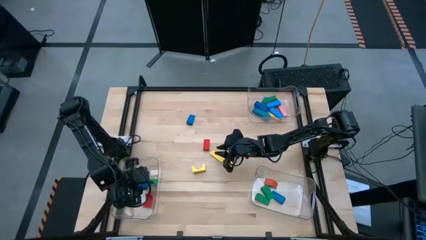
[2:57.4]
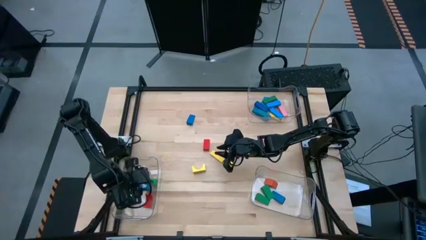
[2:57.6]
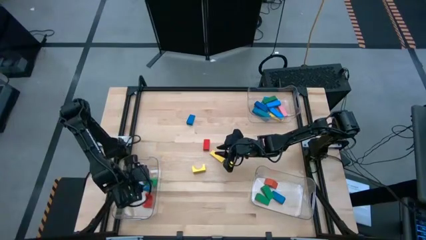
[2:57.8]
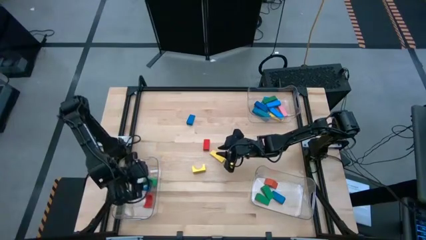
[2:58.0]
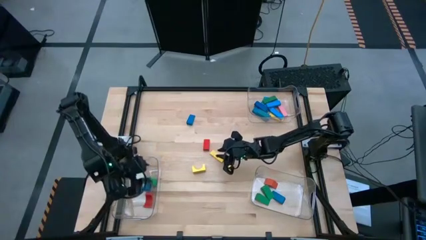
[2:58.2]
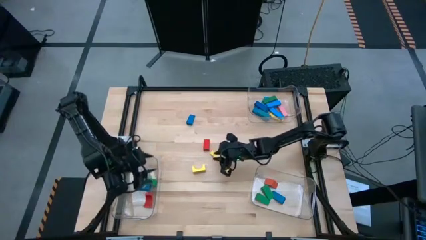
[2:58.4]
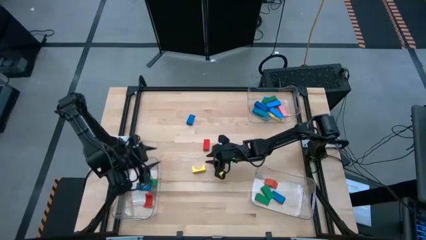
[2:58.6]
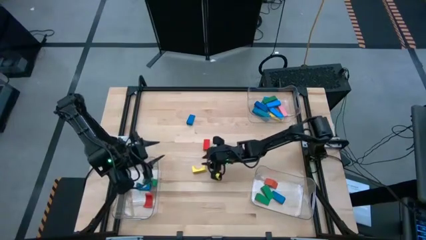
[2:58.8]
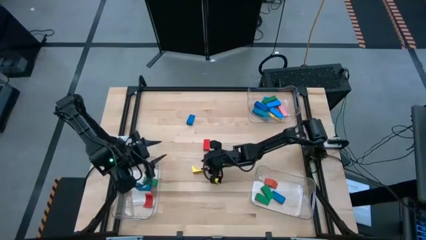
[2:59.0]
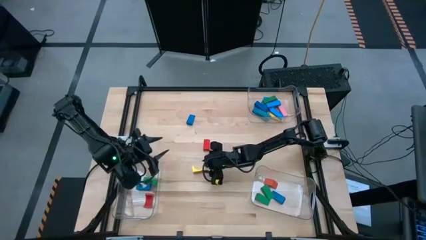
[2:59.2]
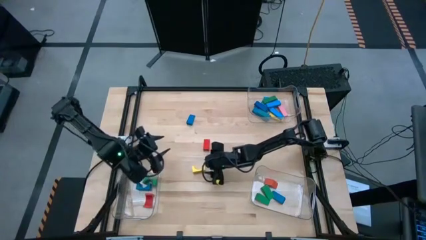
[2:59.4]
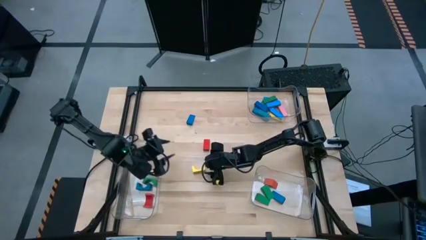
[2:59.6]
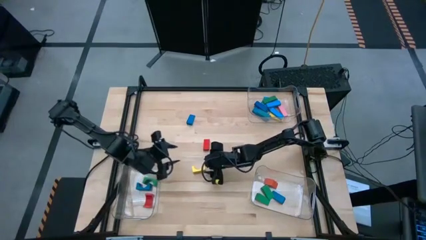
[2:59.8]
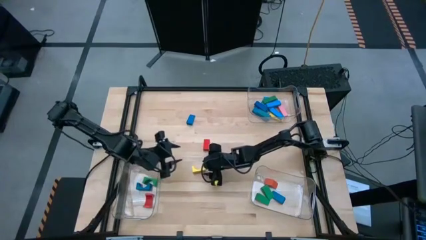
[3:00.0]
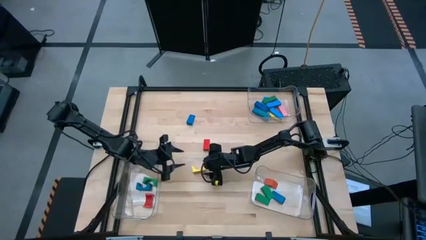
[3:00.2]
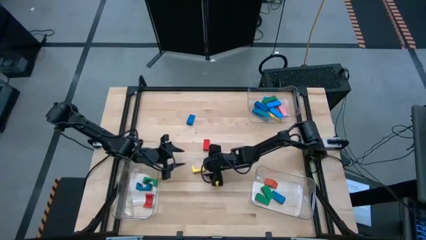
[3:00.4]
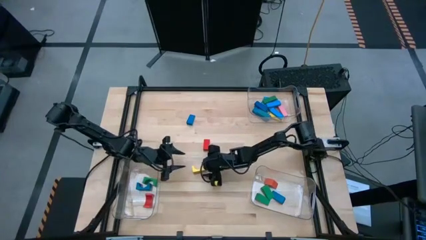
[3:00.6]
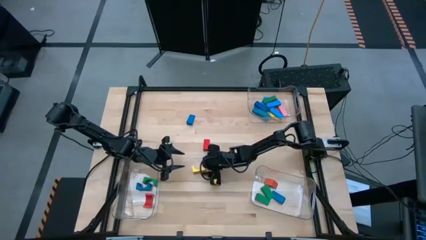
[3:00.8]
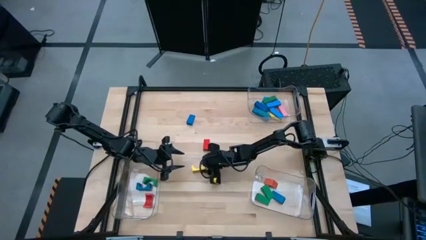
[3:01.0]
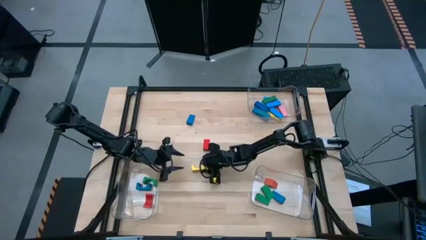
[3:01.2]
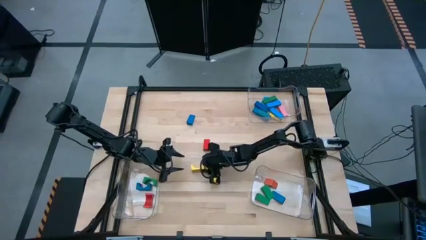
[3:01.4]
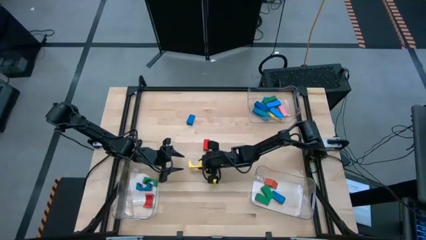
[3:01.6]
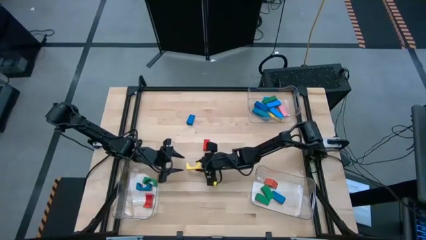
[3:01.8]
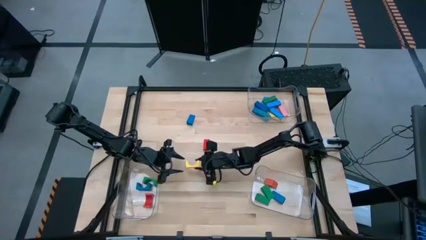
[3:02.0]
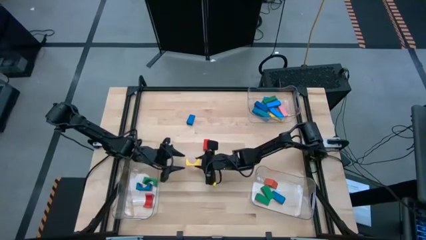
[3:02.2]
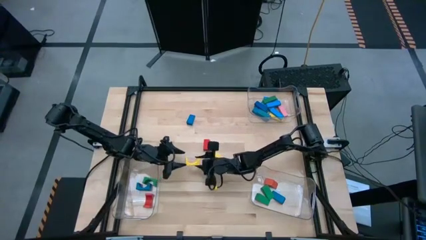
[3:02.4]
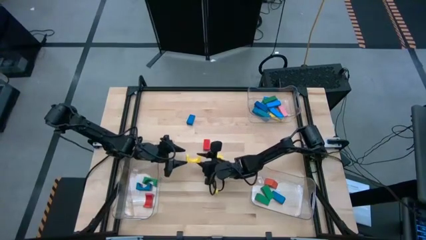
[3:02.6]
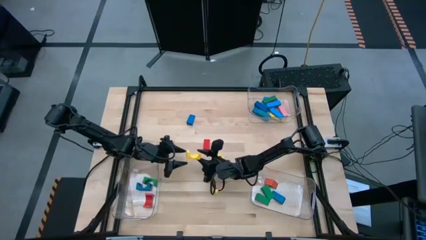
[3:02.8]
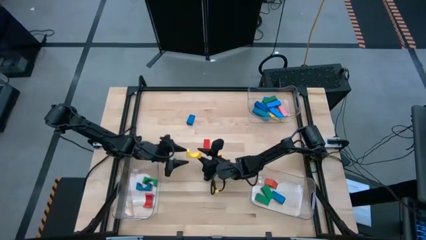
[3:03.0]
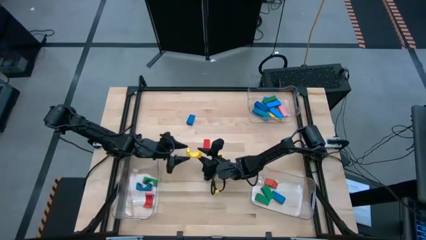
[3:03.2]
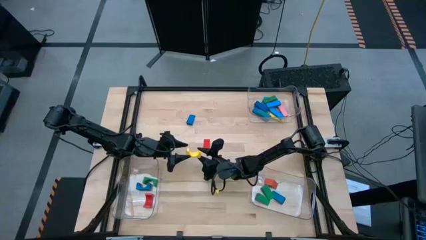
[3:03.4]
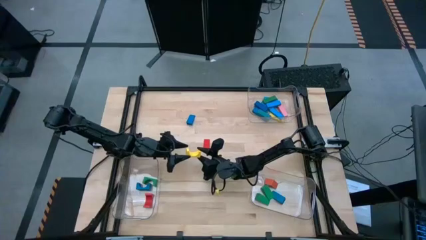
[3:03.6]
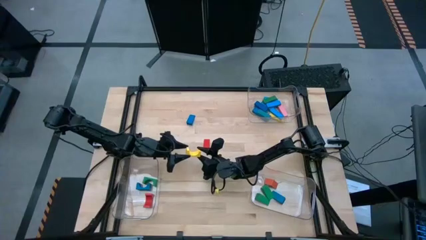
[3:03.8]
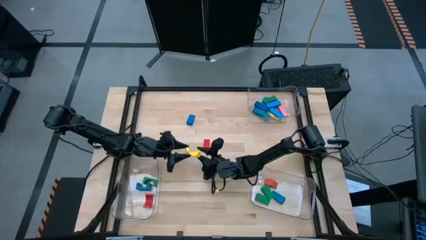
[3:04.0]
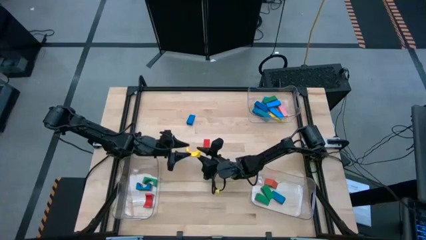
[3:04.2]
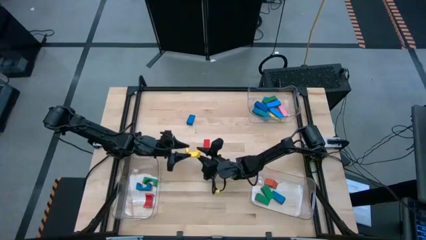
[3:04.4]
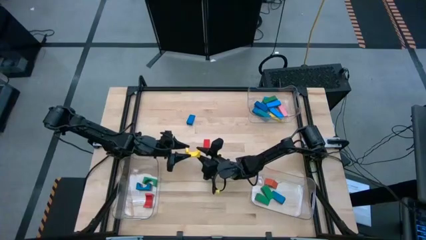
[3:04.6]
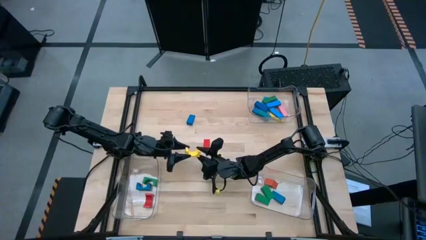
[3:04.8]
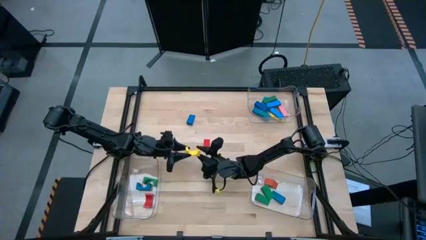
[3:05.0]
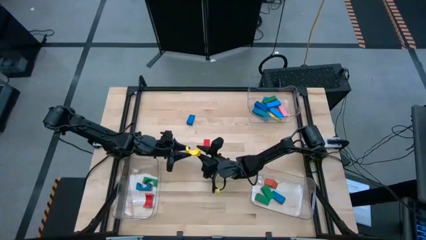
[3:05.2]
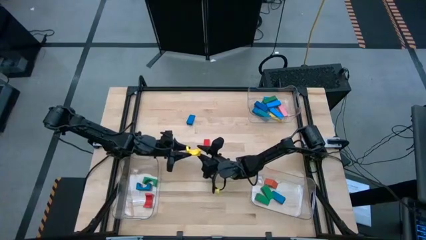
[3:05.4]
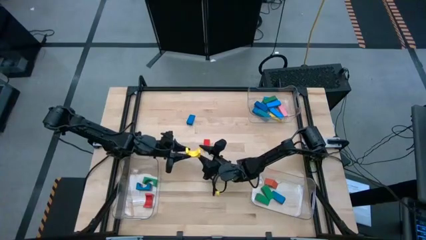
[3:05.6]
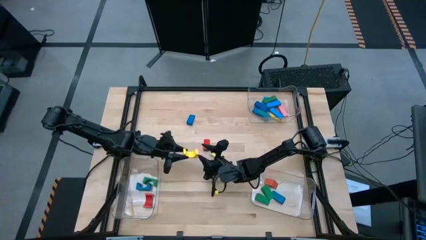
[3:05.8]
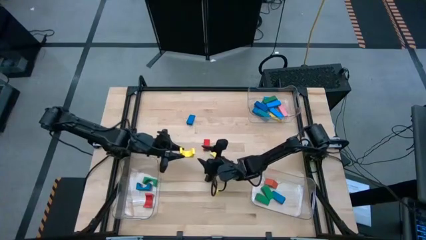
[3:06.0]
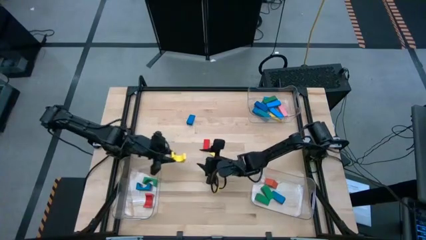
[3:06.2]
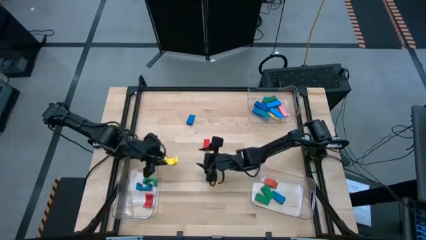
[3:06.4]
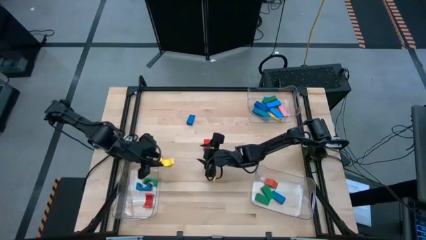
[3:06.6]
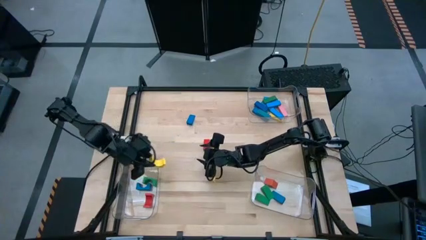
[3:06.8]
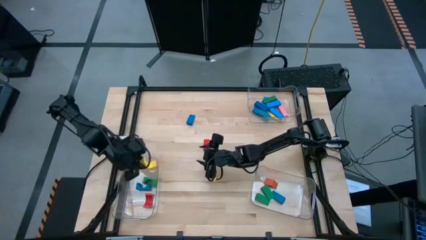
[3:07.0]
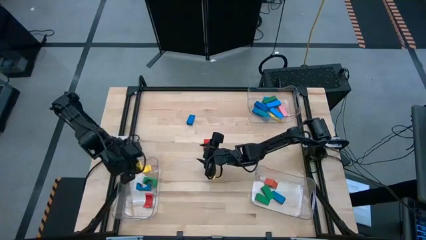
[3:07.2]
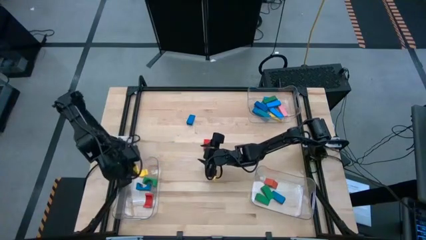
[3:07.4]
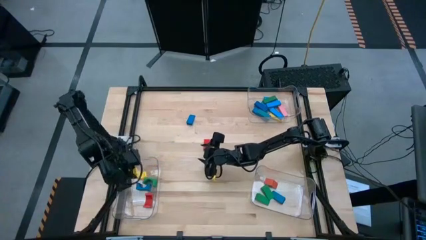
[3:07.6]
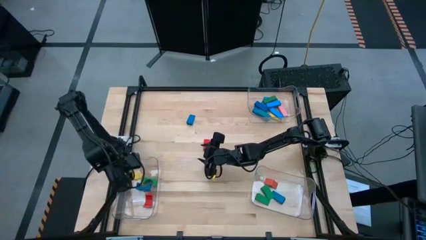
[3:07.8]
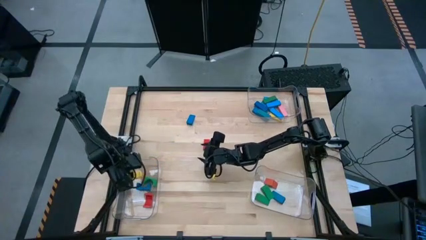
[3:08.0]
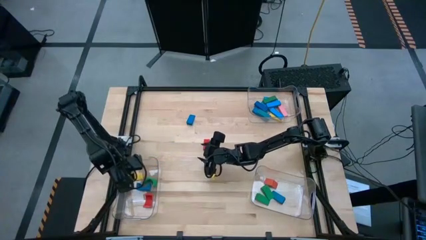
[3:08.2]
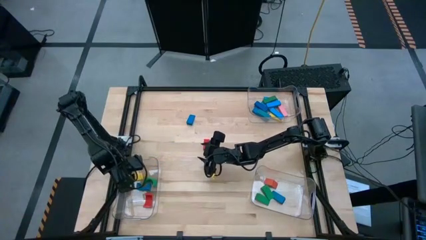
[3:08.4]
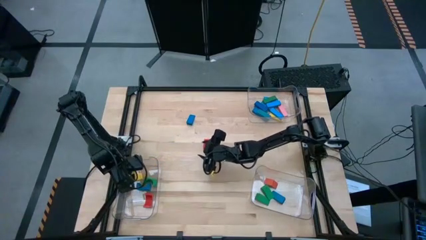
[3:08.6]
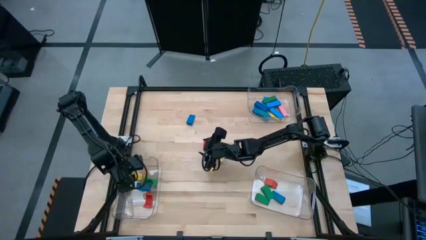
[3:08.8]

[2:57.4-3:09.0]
Task: Sort blocks by size
Put the yellow arch block into the bottom left transparent bin
